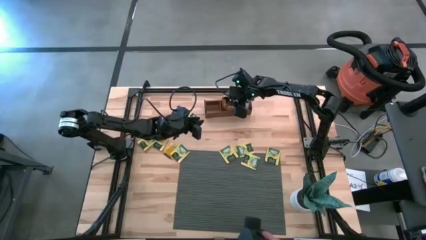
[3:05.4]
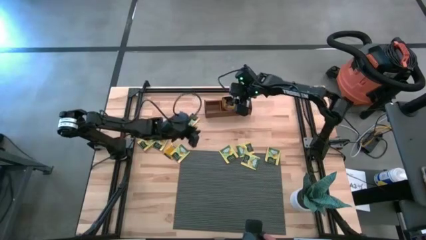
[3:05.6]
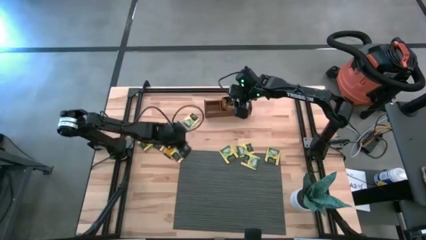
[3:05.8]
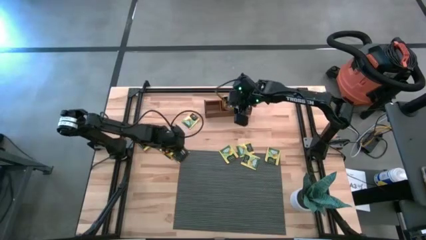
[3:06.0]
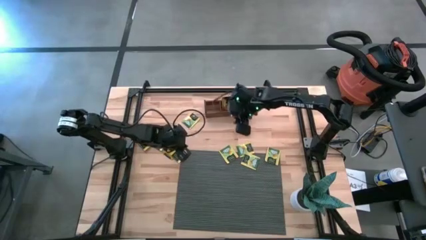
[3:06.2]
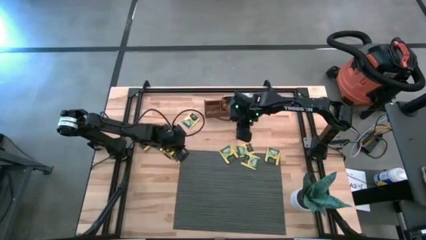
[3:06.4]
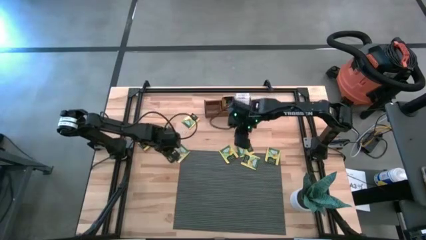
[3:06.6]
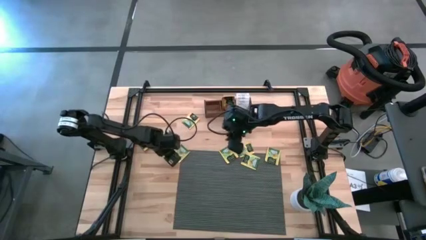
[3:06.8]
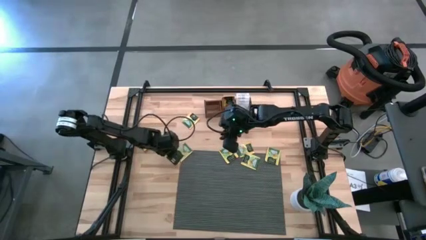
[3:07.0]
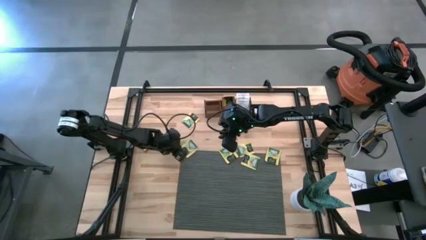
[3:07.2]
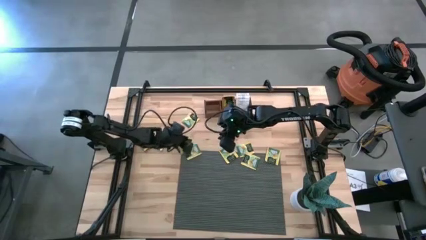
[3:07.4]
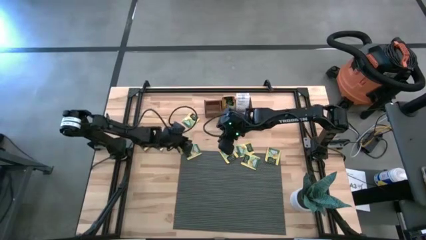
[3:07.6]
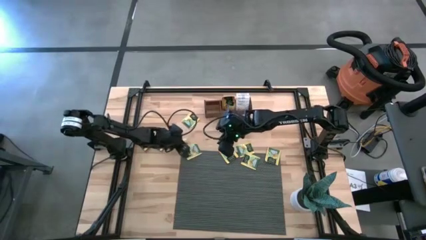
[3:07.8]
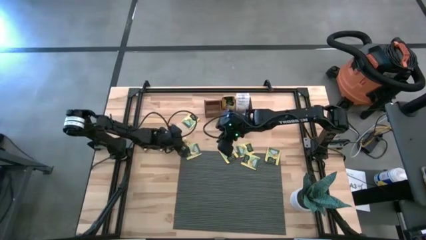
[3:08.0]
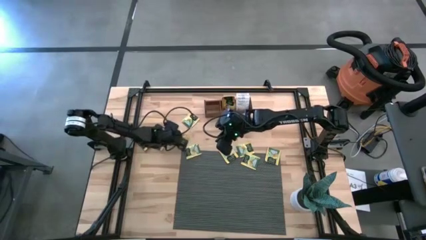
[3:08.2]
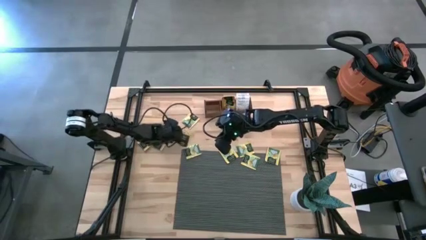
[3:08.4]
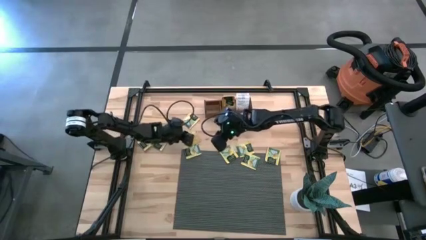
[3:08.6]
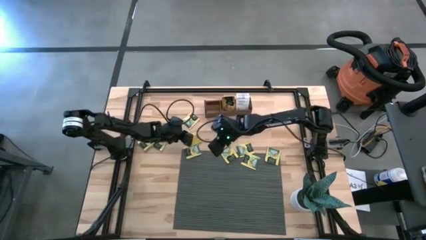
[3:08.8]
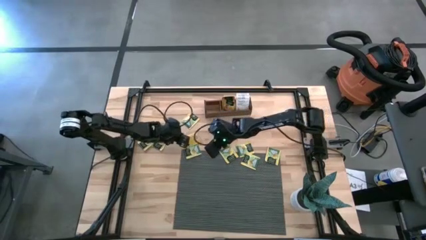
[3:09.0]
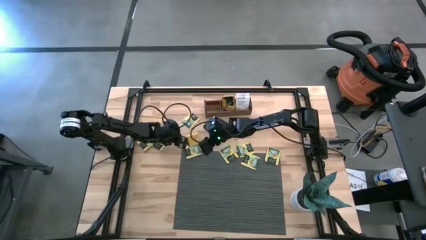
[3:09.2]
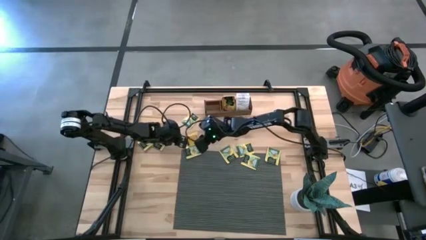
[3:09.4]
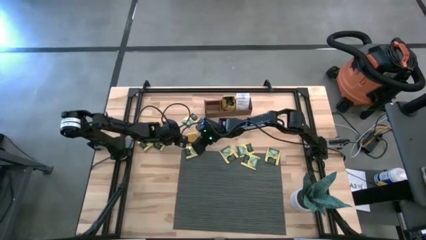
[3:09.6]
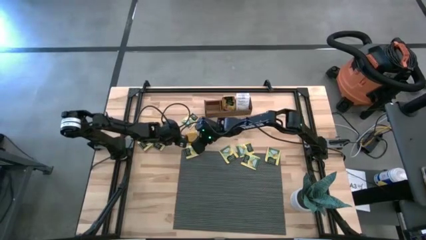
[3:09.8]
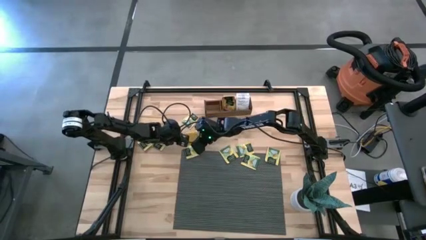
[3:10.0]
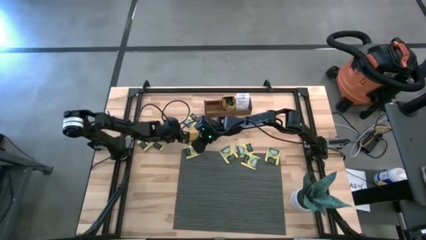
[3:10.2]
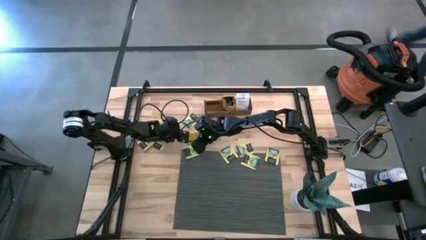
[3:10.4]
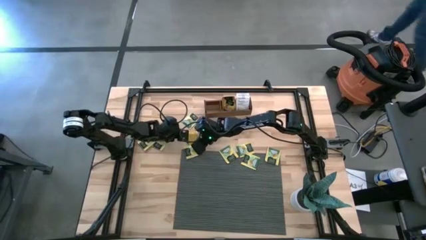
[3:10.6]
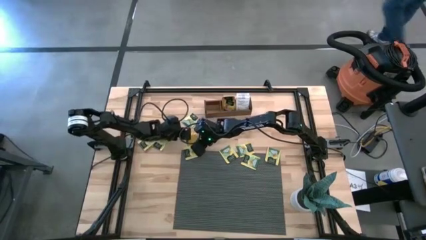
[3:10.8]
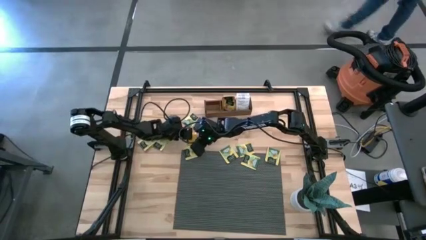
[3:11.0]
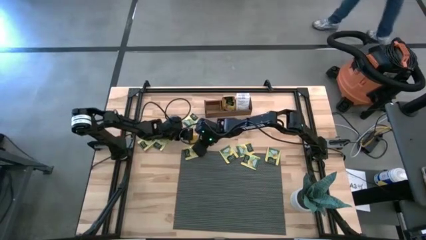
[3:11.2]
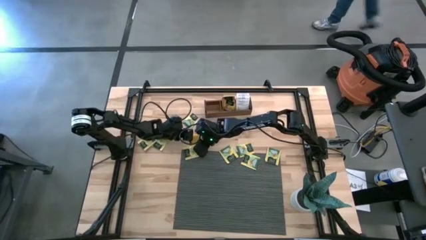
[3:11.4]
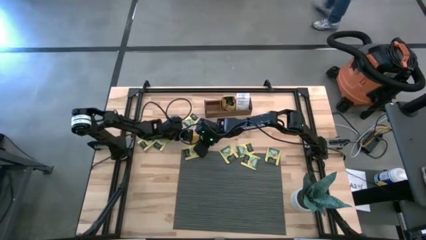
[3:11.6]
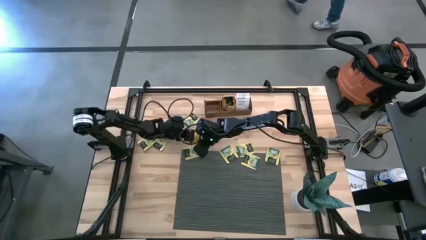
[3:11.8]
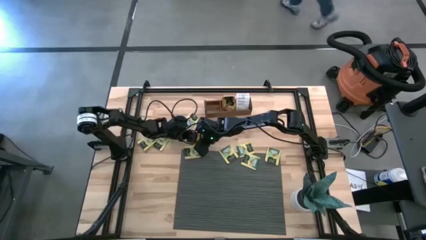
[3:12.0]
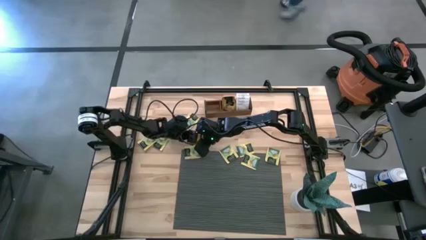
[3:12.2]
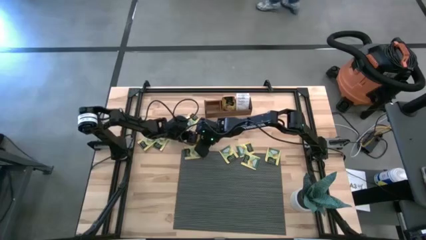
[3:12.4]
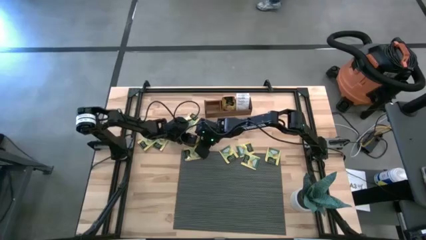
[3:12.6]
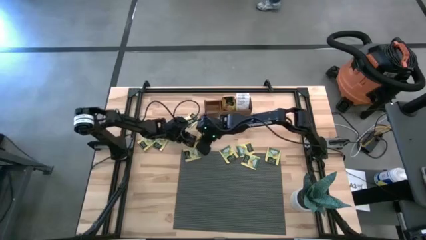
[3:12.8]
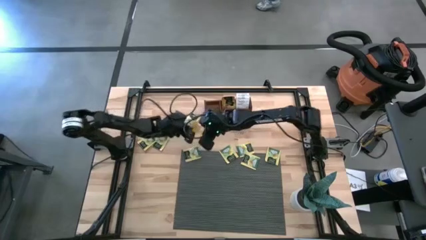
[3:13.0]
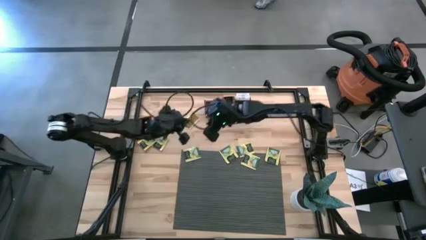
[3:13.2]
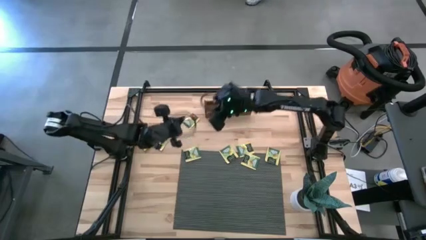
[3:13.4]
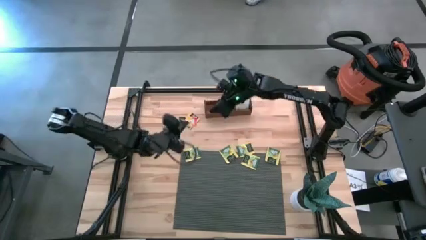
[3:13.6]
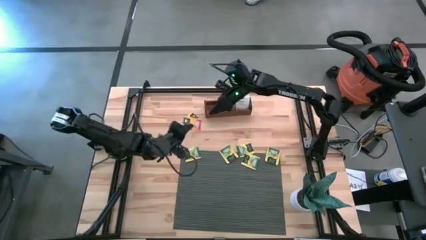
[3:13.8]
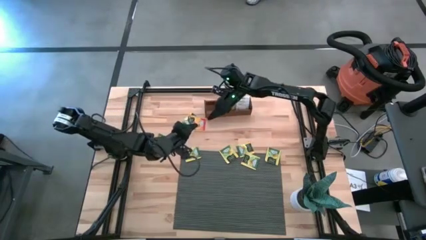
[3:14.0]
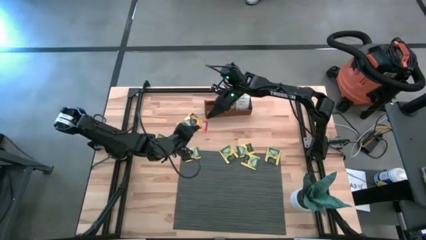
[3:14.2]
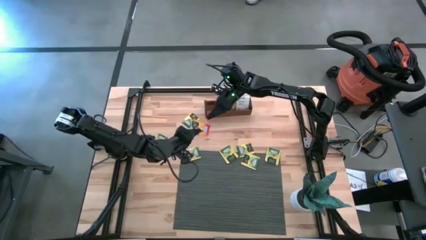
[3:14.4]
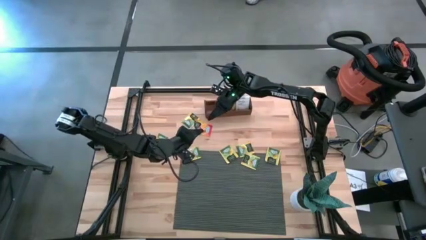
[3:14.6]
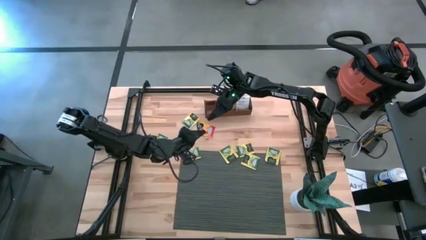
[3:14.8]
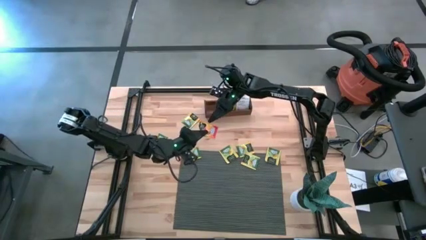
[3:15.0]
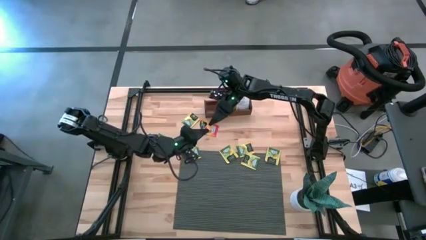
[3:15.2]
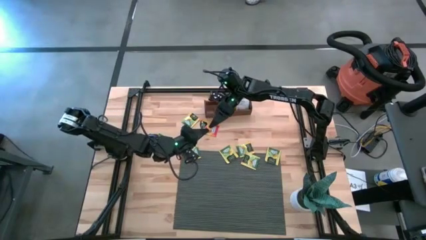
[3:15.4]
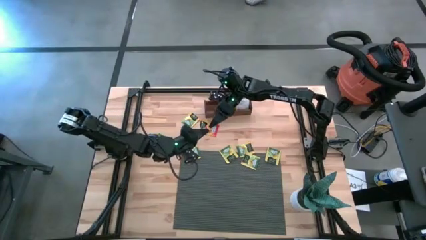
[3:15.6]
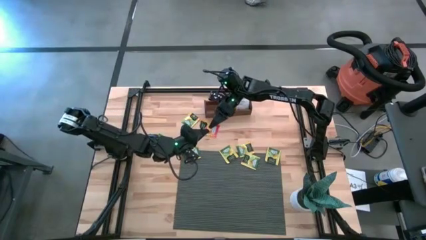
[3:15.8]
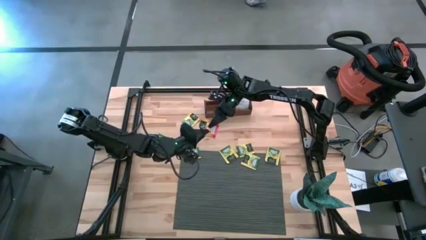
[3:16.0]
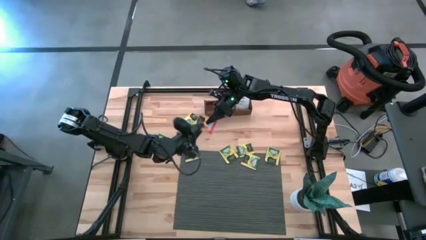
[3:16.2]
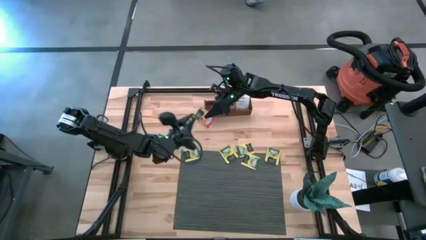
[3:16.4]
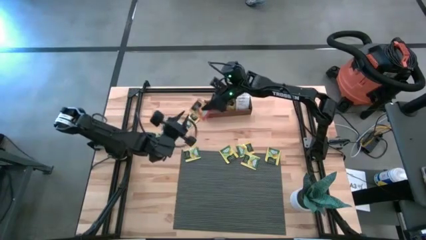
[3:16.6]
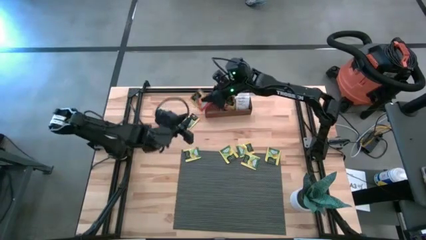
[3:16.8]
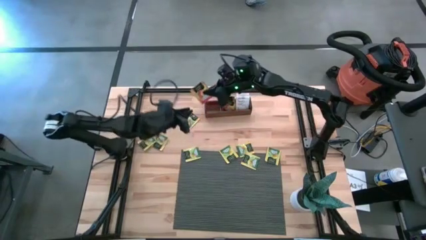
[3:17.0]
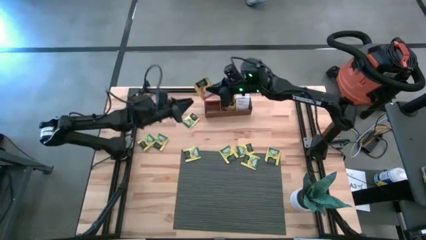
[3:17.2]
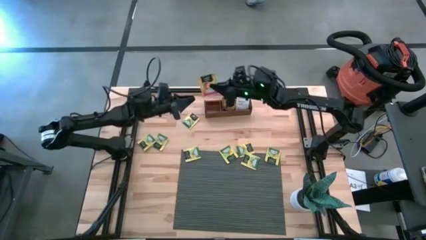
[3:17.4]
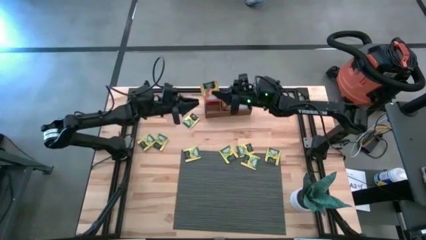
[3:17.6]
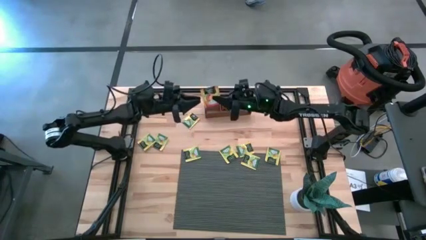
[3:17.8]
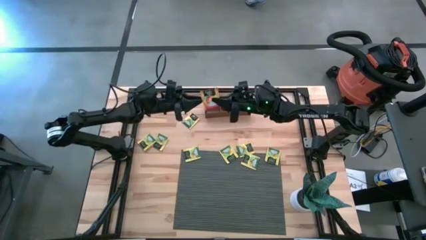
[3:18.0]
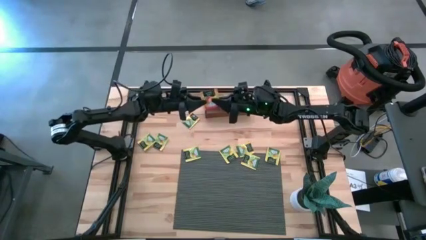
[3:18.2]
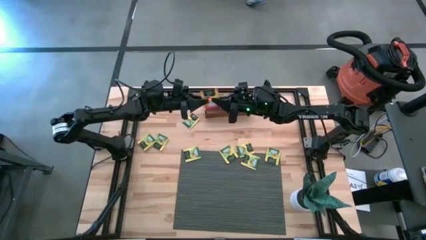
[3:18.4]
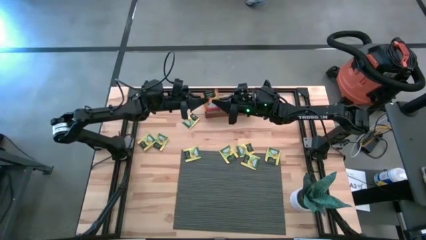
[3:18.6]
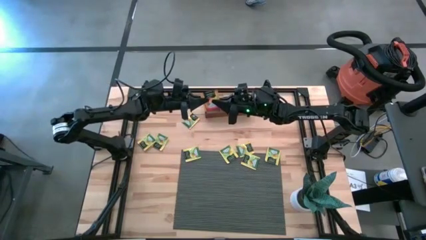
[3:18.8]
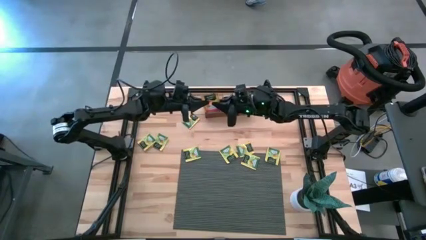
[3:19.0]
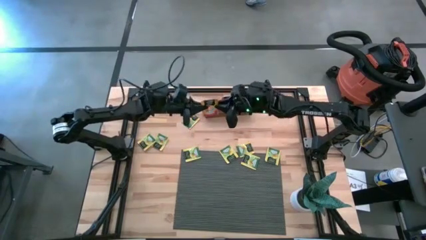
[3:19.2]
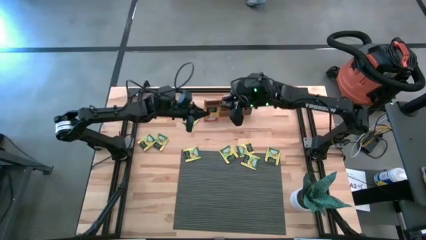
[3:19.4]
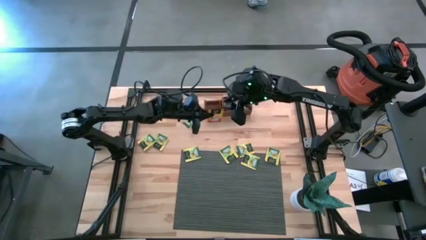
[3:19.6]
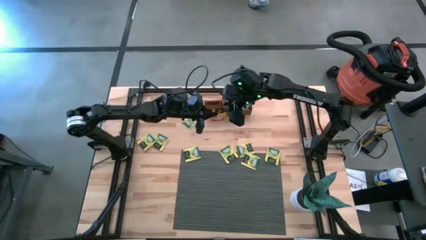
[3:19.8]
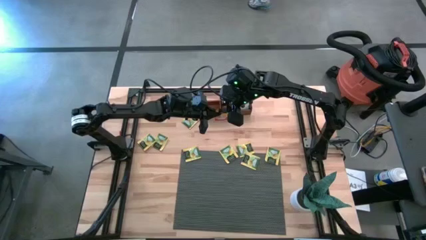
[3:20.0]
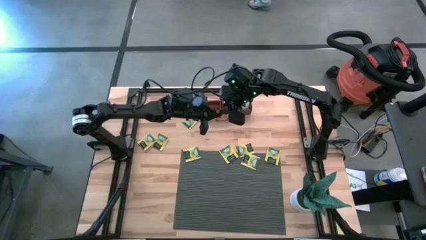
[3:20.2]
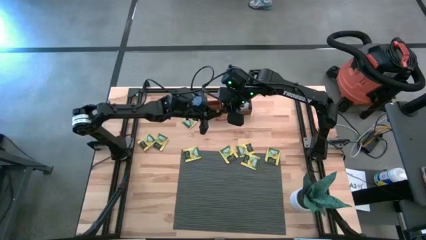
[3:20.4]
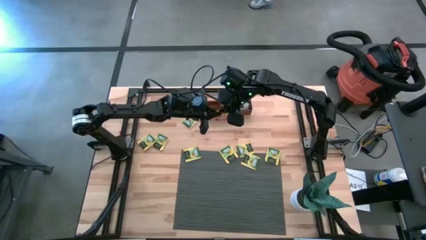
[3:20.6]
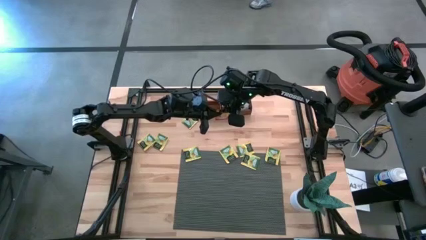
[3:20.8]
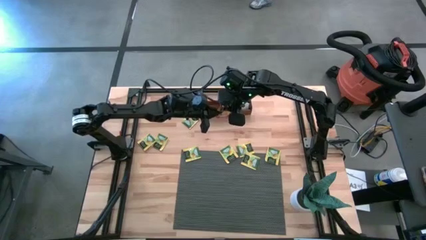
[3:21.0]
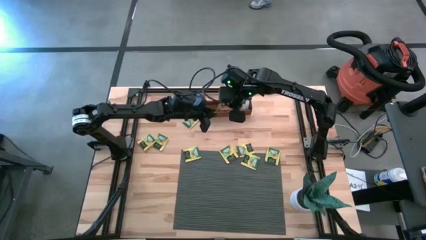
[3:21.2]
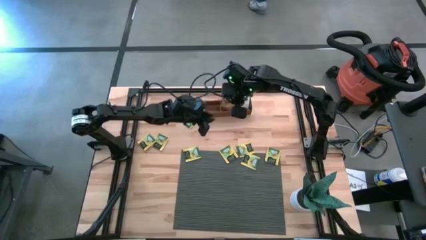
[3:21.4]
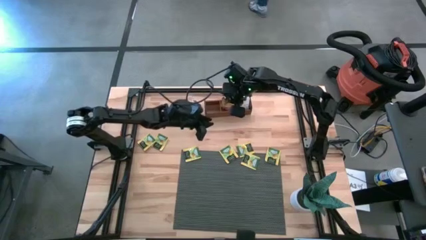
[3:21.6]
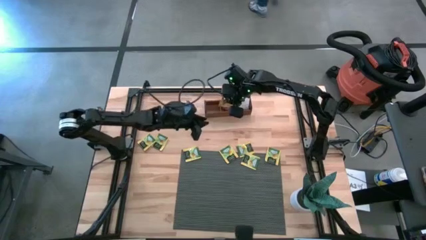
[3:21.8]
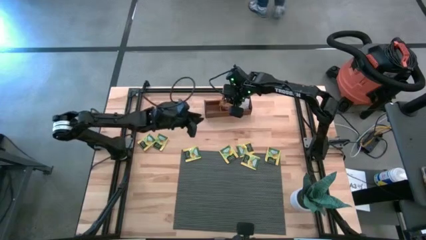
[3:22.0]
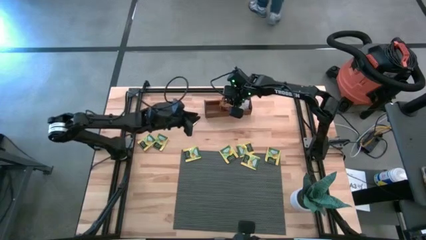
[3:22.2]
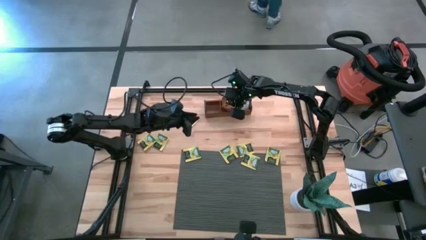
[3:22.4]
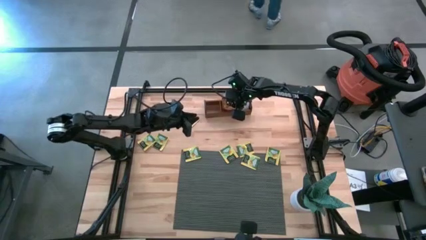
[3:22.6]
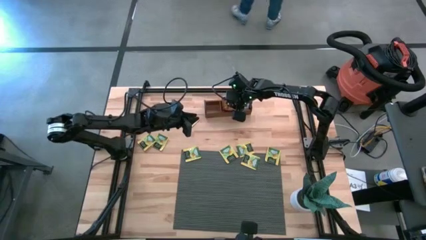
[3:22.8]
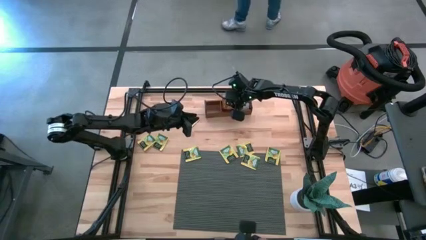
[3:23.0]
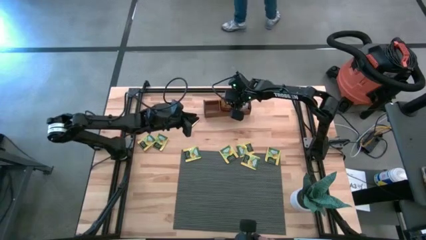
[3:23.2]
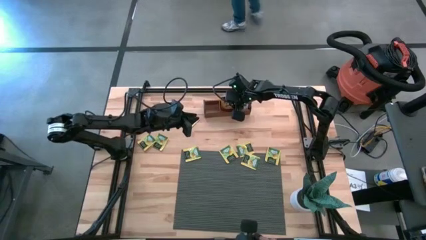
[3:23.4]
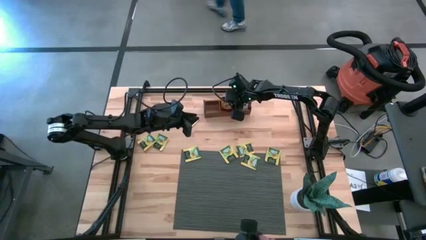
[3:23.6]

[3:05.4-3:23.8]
Task: Pick & Place Tea
Put the orange tea bag into the middle section of the wooden organizer
